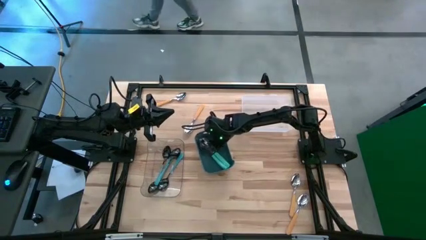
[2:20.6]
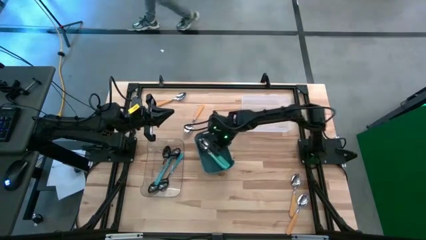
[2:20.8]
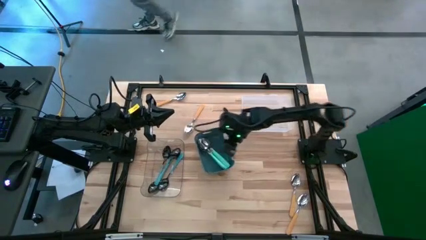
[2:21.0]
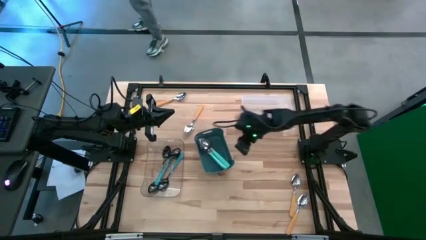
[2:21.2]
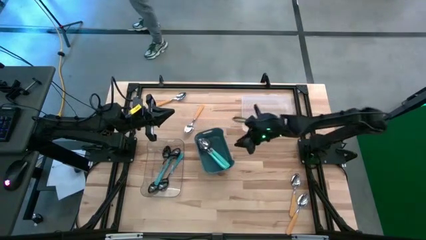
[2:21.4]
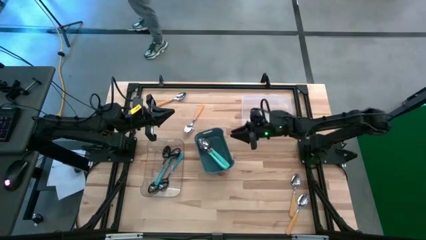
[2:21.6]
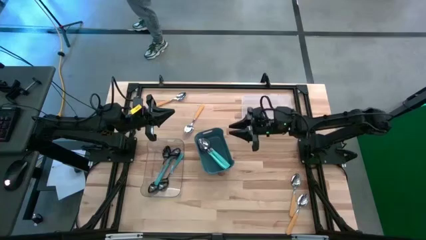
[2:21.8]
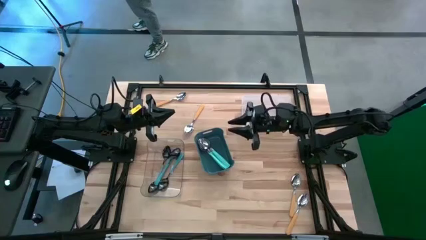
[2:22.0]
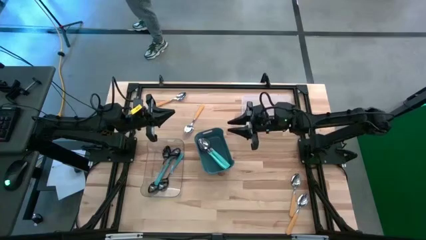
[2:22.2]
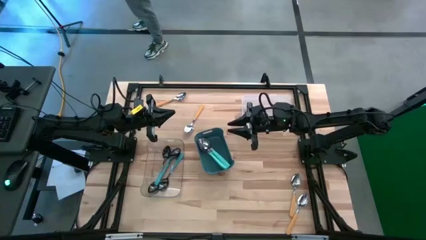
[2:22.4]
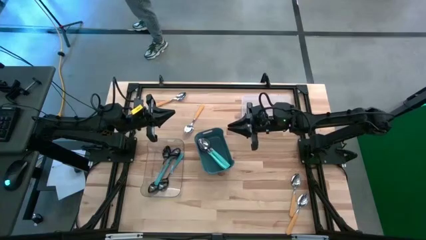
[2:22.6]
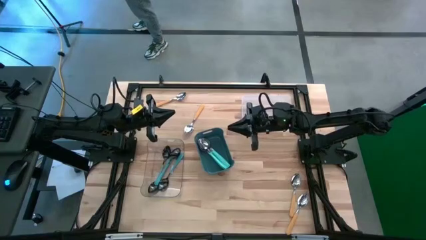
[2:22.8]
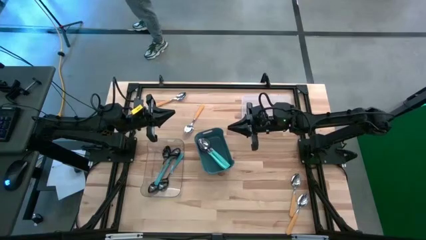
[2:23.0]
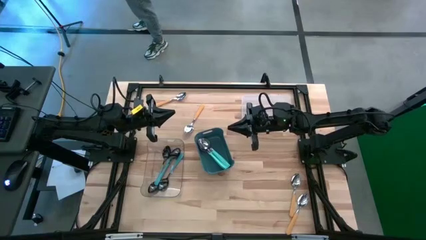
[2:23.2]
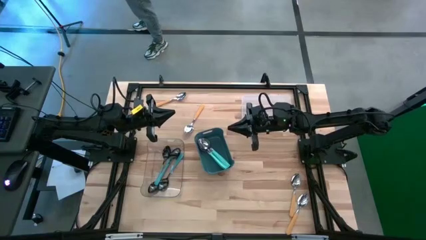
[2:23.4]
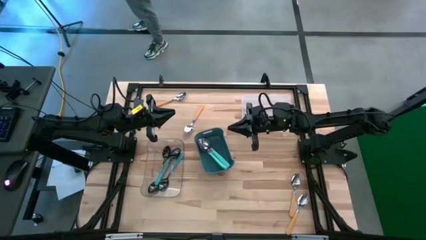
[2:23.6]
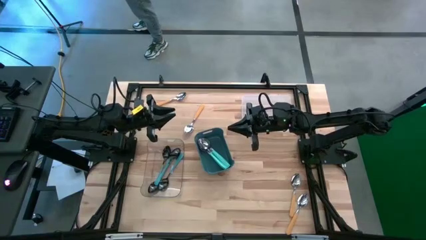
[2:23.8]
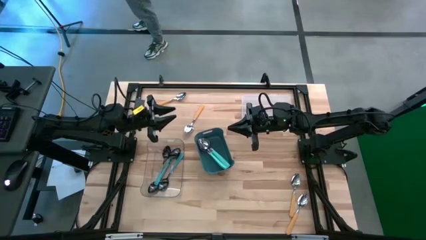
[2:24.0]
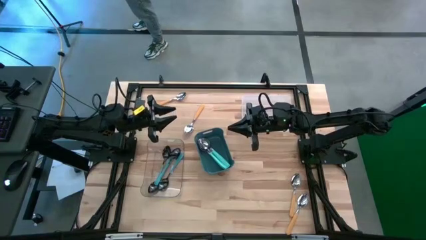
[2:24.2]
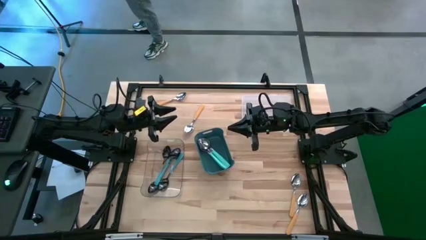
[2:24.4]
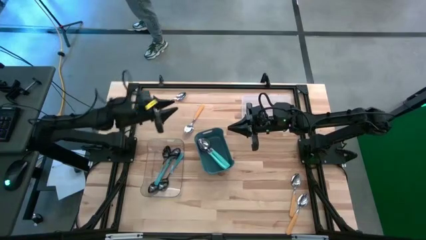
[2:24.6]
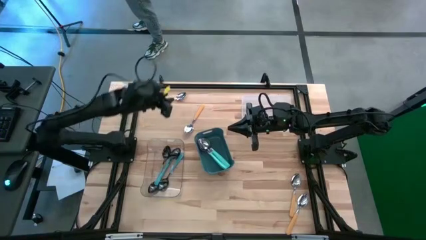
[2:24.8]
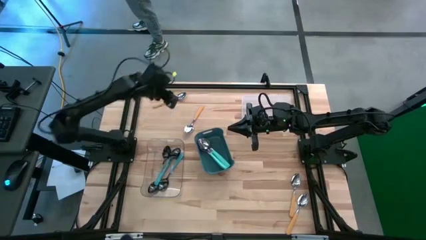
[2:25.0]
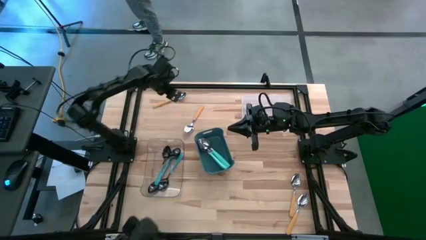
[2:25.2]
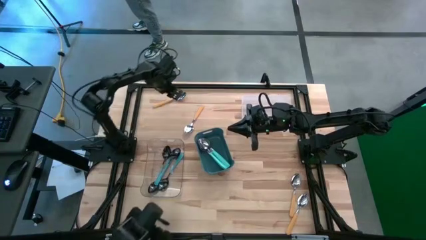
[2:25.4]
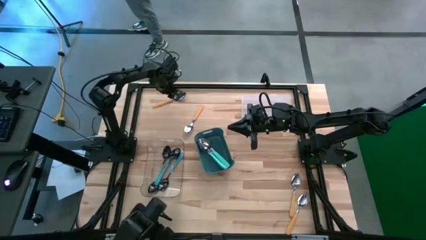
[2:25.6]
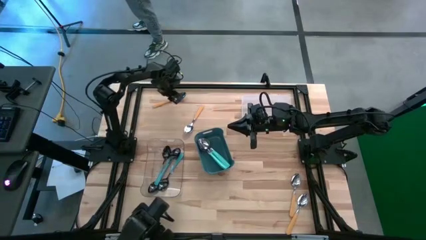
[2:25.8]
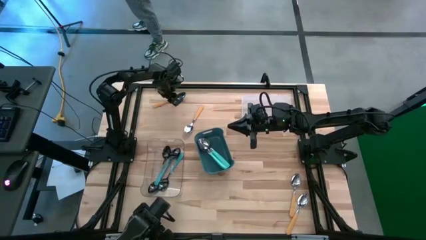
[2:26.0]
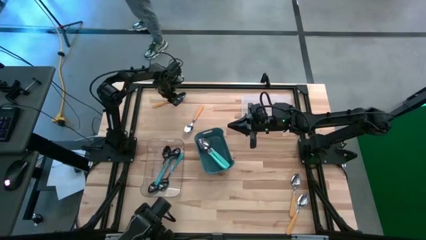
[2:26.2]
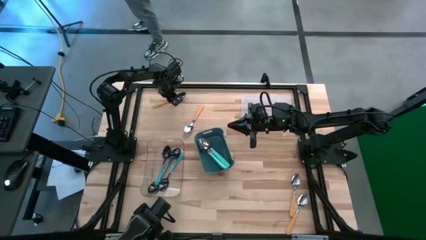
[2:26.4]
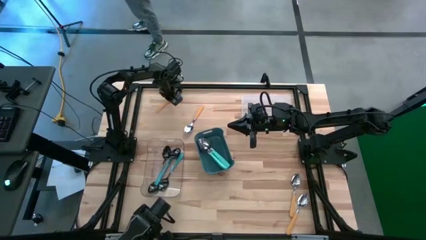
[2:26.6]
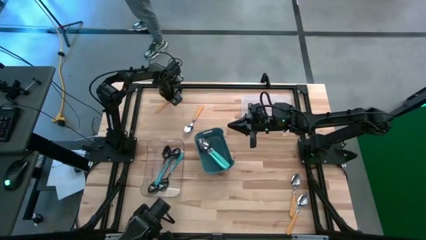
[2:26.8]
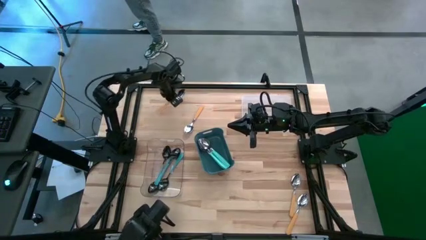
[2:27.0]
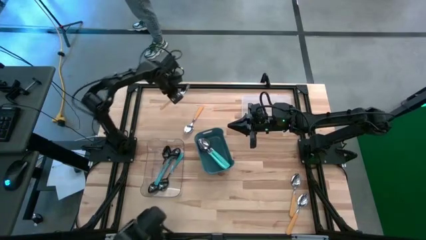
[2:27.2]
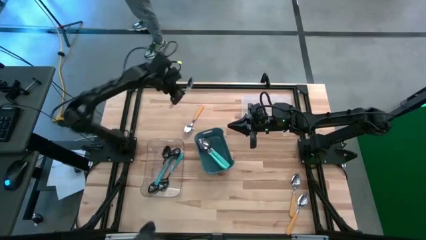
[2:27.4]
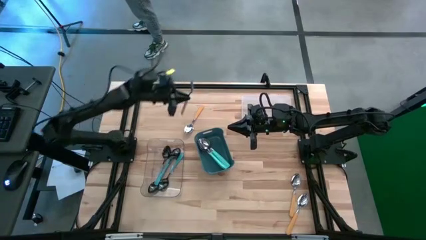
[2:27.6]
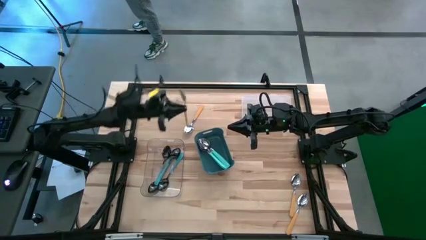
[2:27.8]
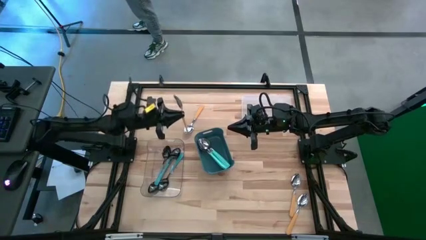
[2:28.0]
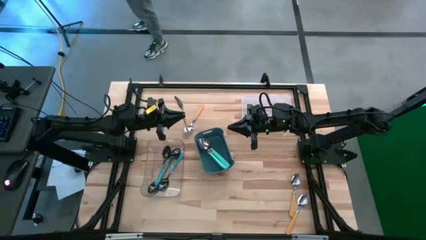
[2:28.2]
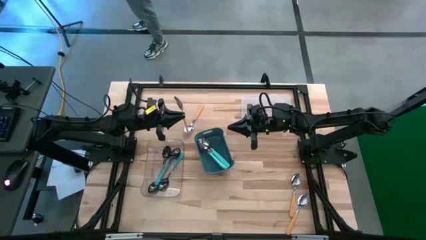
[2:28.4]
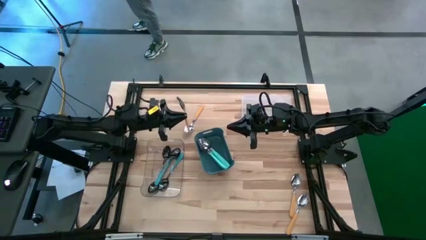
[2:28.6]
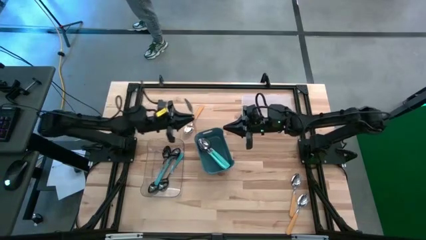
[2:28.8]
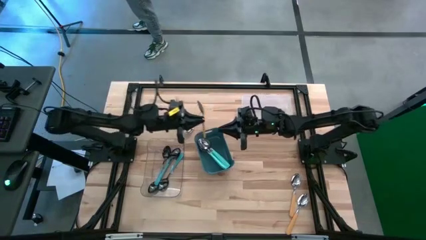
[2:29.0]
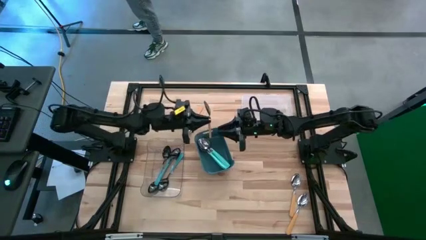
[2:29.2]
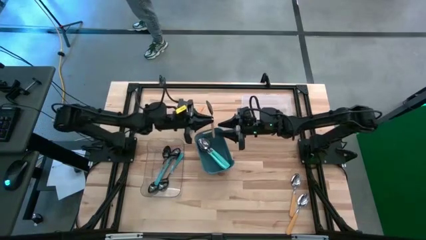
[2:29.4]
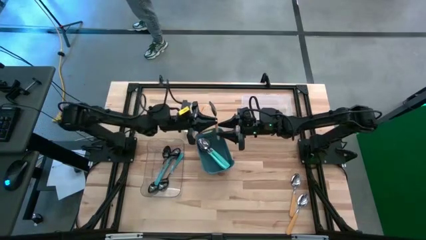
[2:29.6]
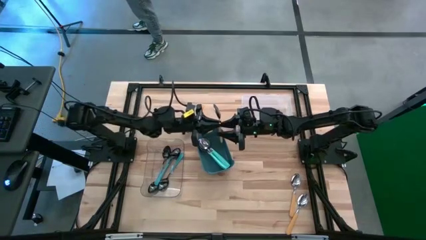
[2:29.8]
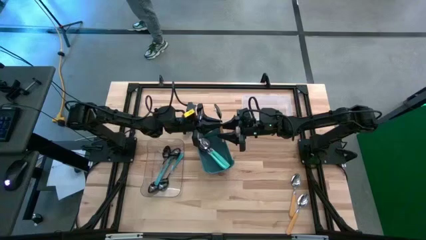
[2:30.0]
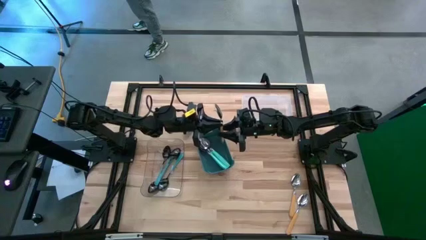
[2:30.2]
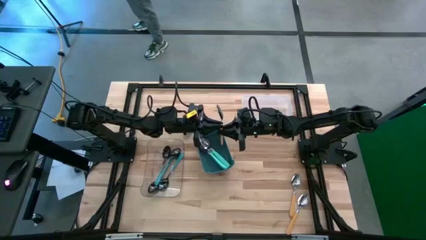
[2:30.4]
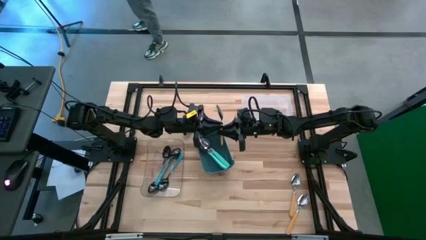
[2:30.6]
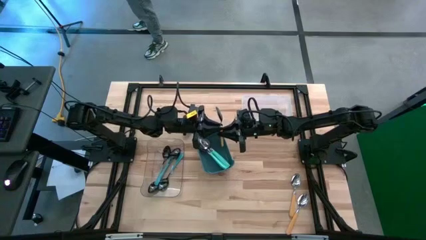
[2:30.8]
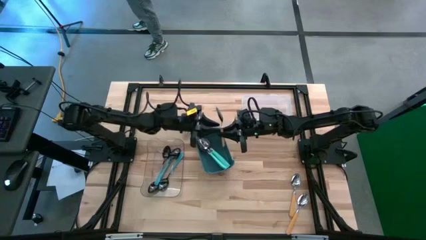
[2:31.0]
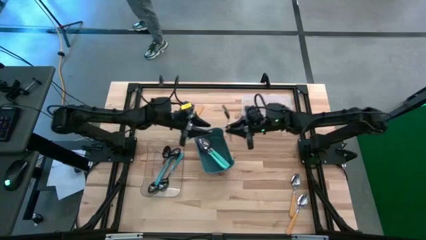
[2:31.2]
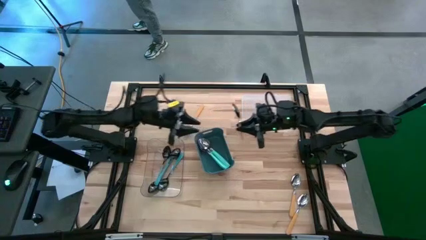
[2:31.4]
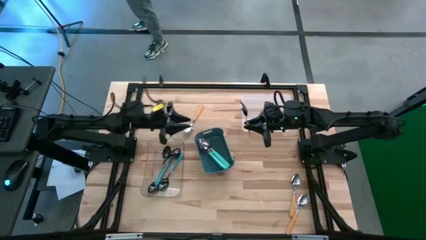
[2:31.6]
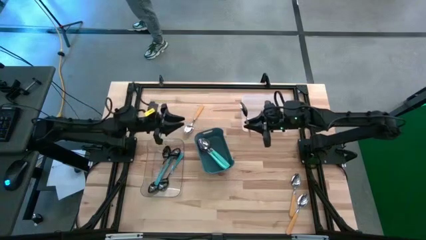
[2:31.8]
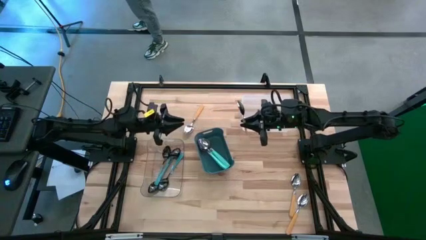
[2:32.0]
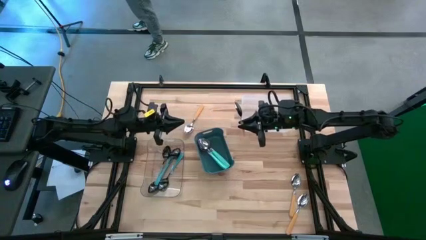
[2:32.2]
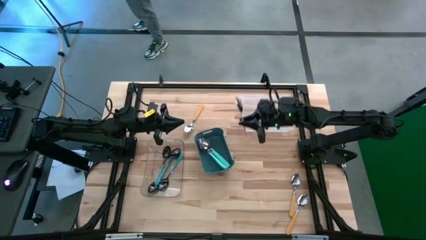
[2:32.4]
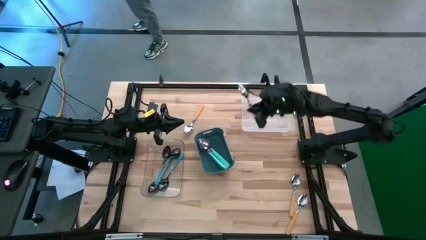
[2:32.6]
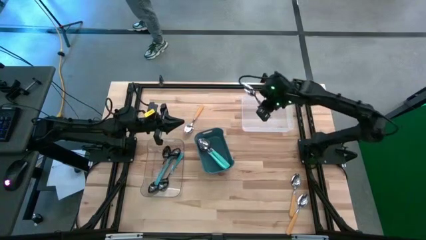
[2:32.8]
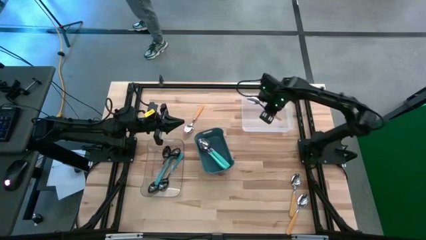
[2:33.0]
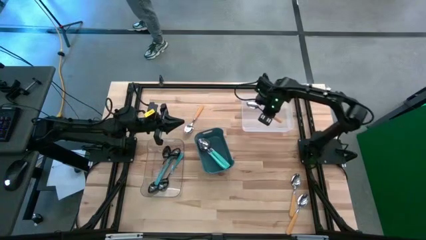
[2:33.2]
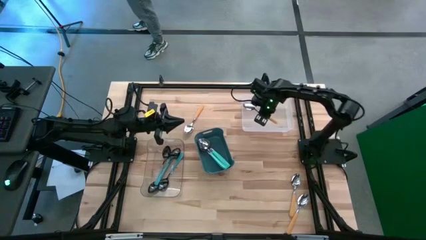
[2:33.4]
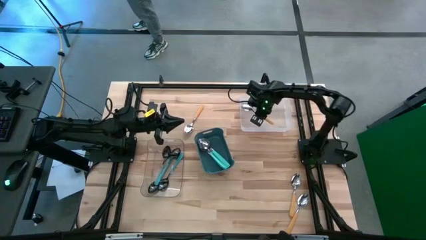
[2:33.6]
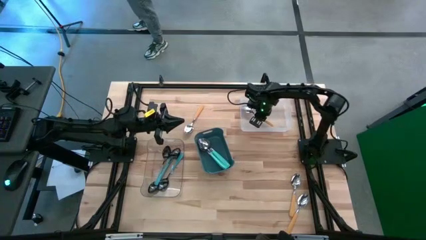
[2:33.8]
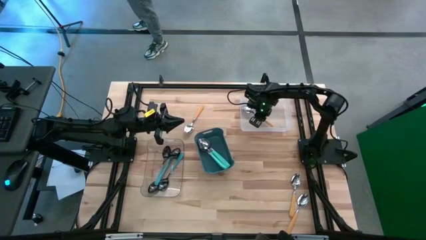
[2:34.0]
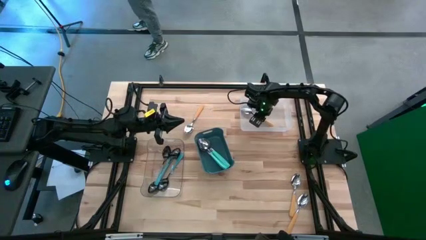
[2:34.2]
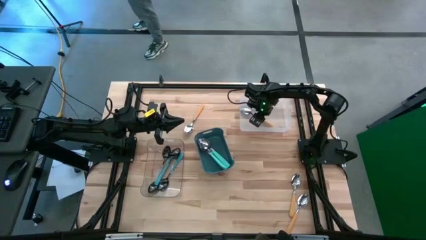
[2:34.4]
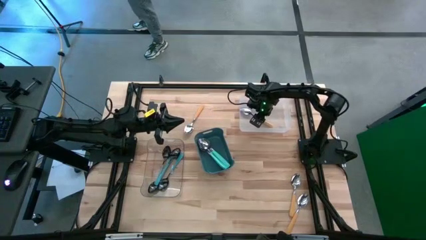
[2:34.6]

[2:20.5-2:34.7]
Task: Sort silverware by color (type)
Put the orange spoon into the white bin

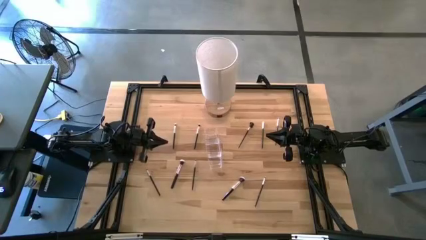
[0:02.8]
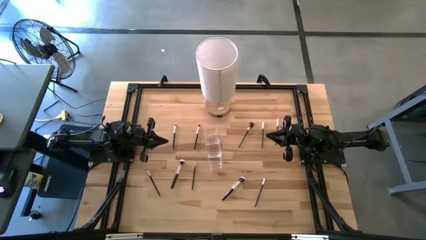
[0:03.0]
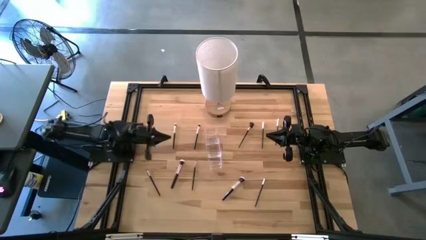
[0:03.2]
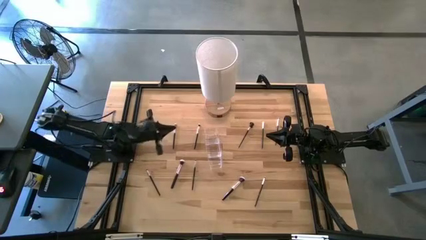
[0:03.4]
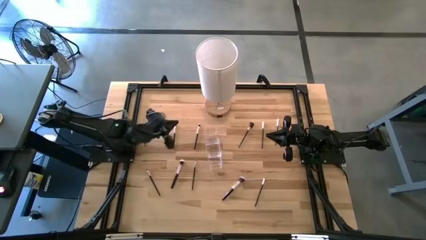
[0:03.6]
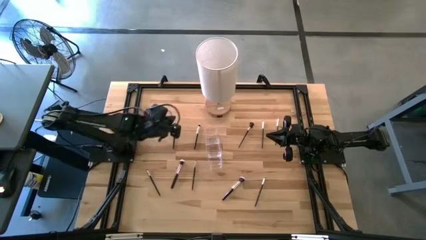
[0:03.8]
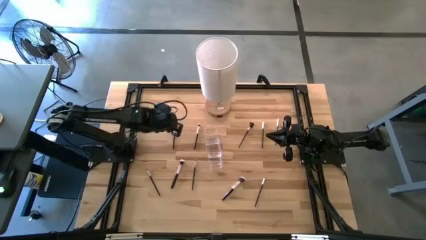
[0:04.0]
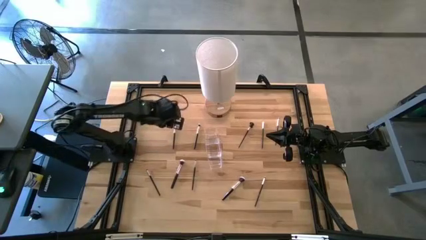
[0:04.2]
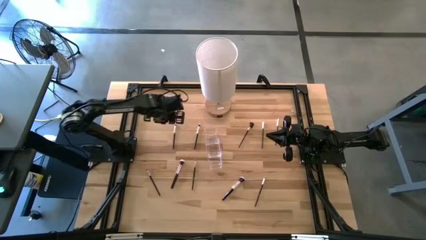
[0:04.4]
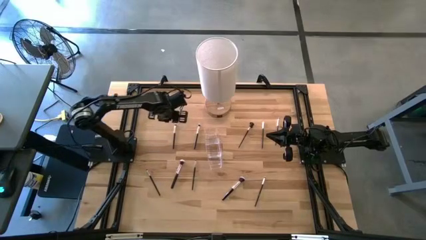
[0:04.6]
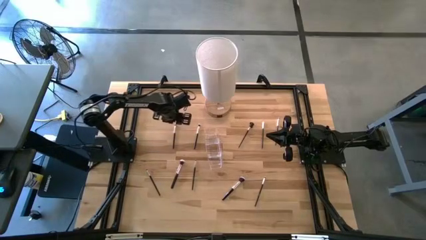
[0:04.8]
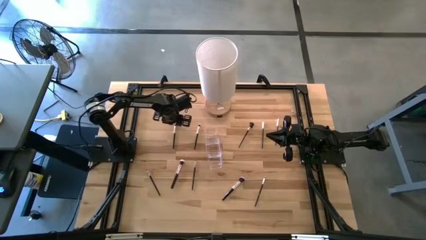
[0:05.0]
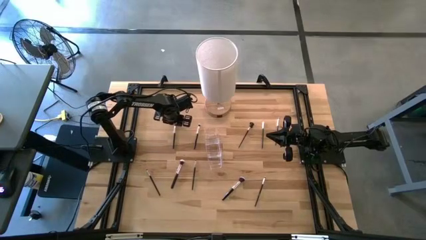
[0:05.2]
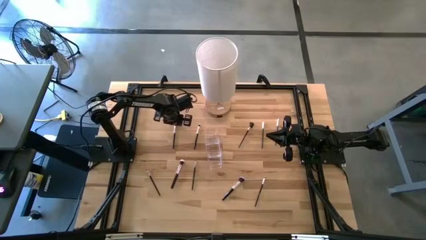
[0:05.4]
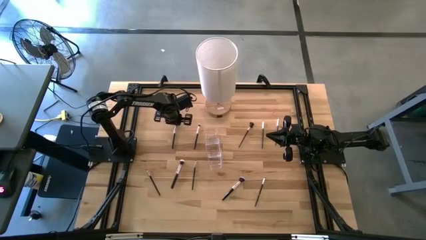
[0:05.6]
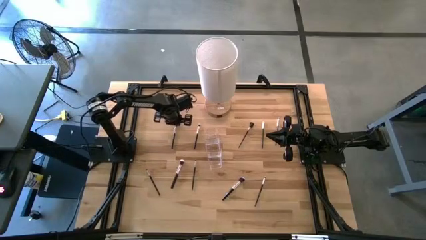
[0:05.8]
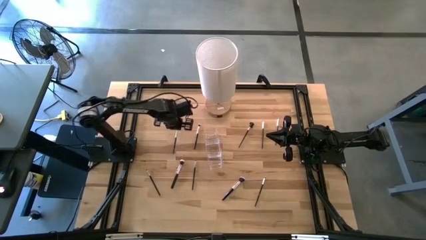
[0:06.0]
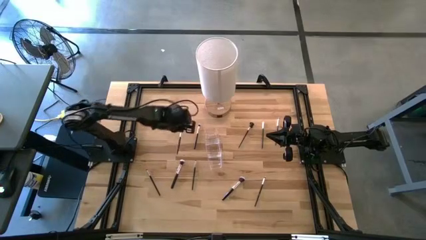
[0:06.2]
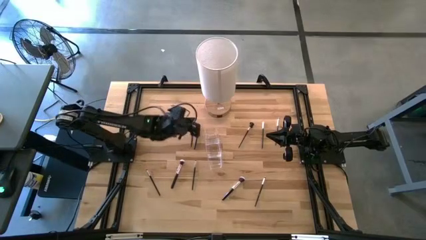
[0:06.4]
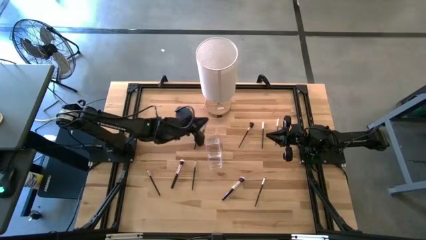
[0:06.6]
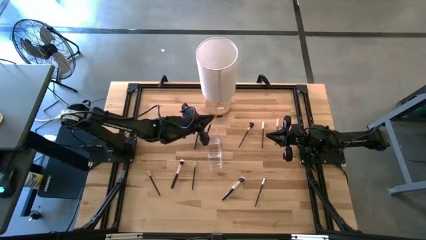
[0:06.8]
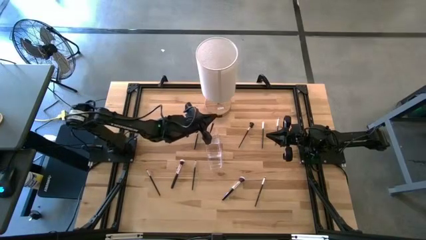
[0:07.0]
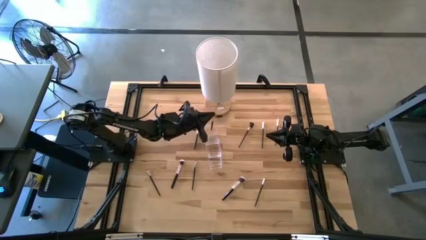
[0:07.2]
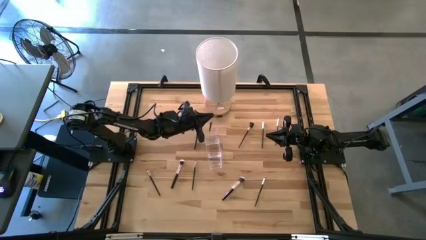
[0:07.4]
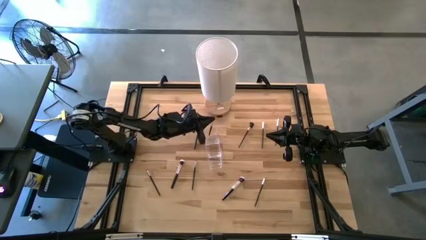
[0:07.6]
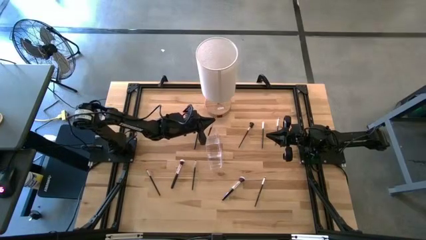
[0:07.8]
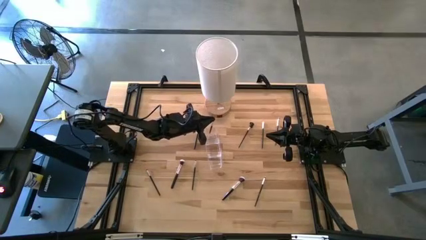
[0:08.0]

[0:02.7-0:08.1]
Task: Put items in baskets/containers
Put the black eyeshadow brush into the transparent organizer
